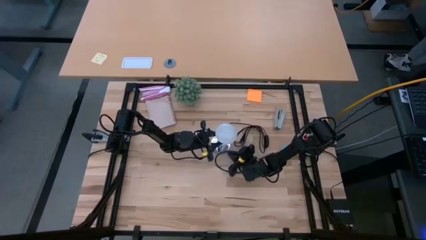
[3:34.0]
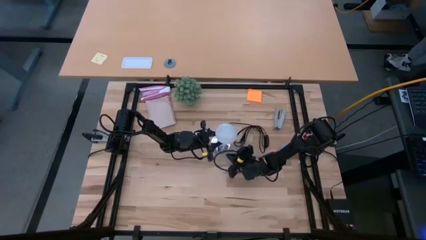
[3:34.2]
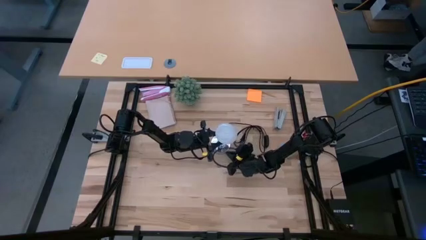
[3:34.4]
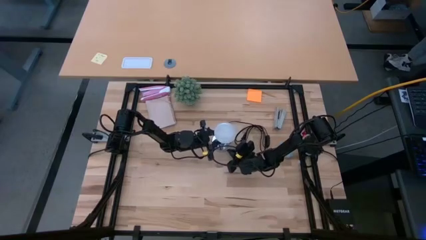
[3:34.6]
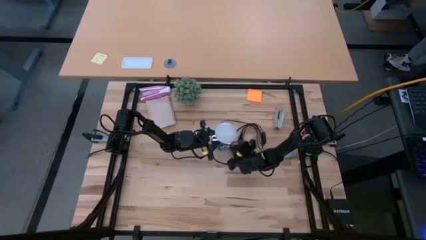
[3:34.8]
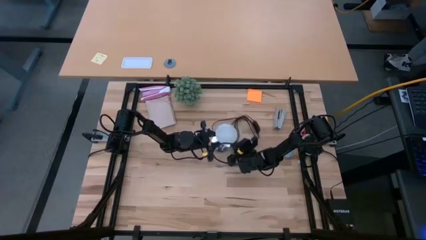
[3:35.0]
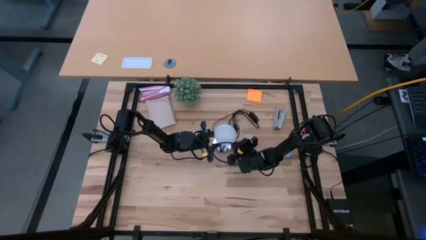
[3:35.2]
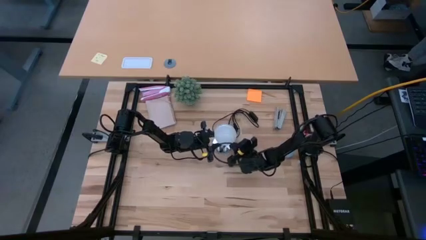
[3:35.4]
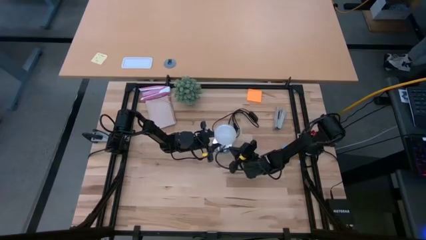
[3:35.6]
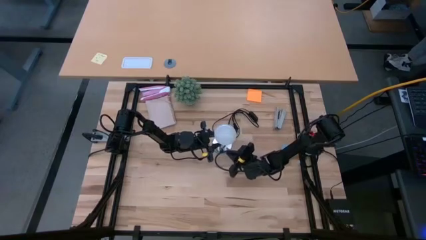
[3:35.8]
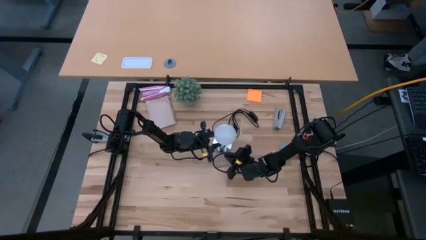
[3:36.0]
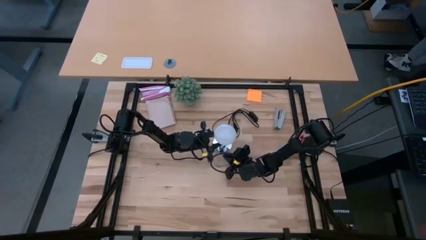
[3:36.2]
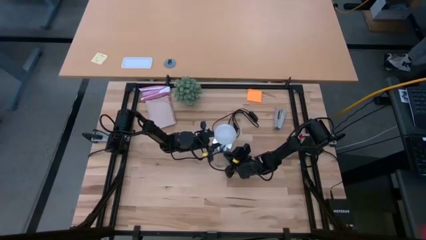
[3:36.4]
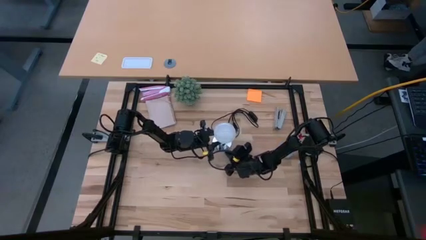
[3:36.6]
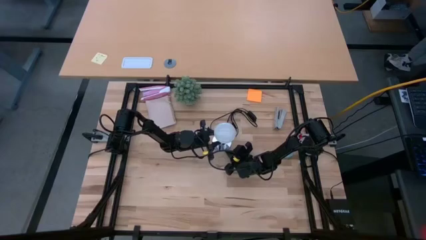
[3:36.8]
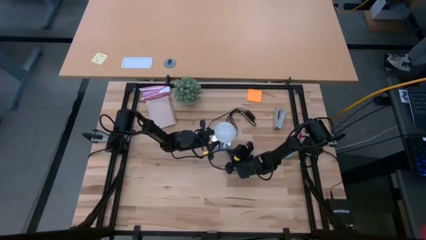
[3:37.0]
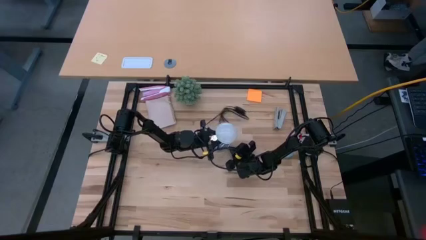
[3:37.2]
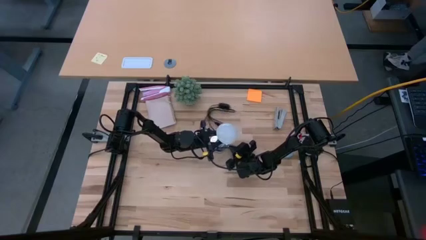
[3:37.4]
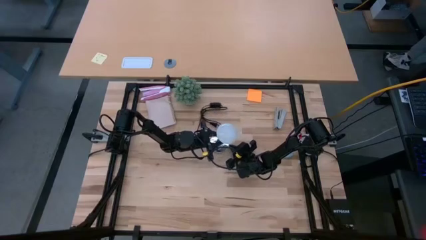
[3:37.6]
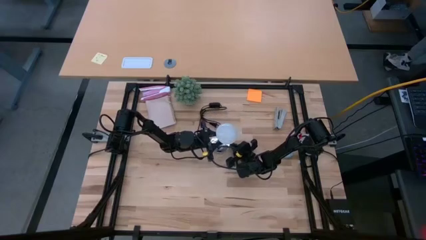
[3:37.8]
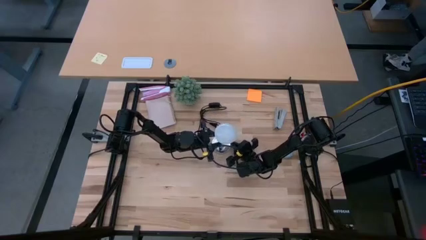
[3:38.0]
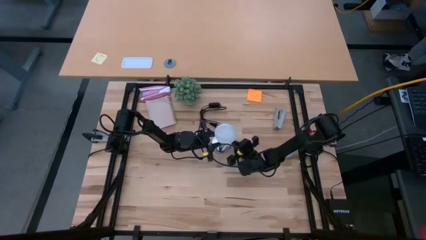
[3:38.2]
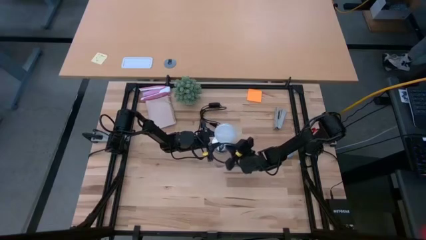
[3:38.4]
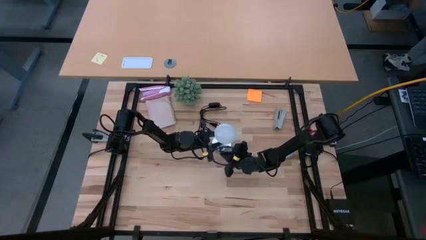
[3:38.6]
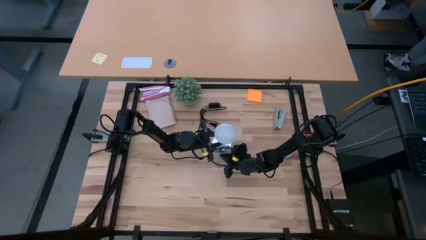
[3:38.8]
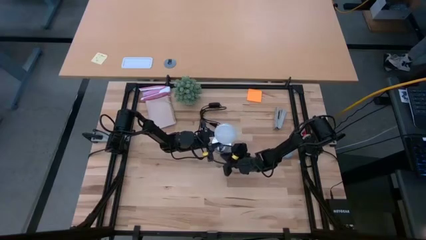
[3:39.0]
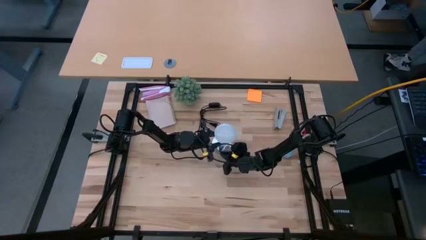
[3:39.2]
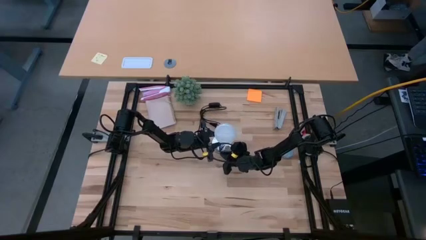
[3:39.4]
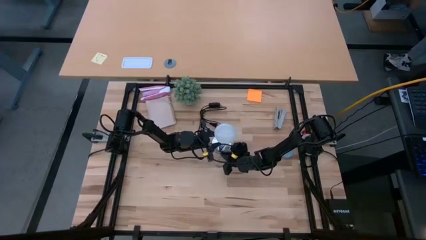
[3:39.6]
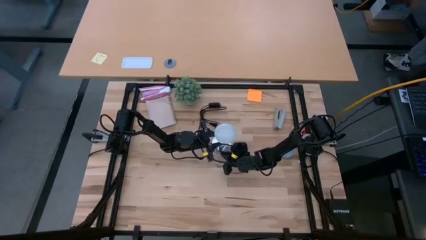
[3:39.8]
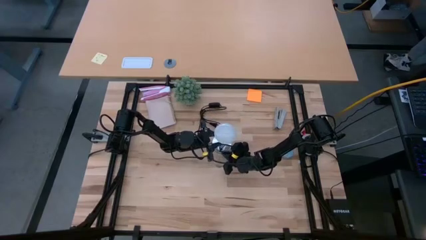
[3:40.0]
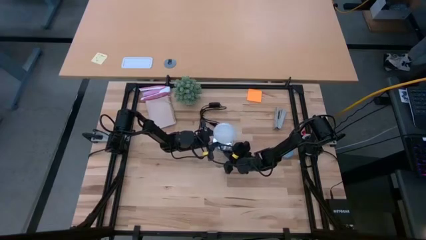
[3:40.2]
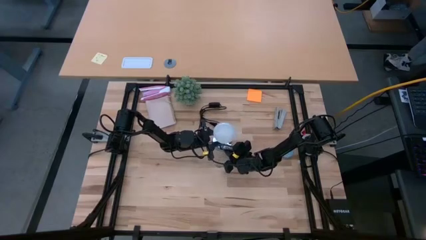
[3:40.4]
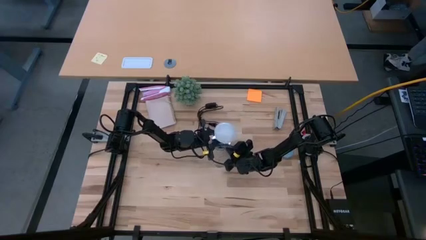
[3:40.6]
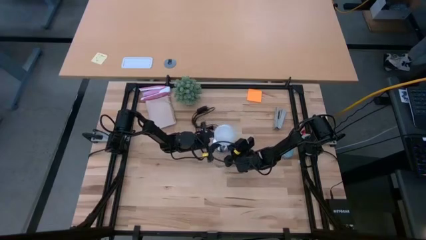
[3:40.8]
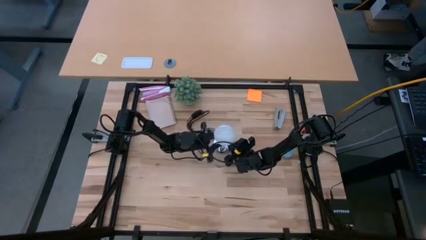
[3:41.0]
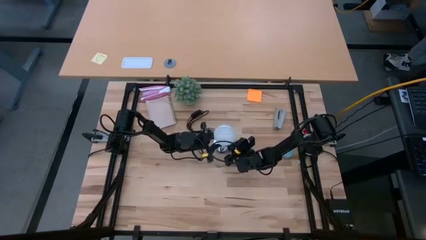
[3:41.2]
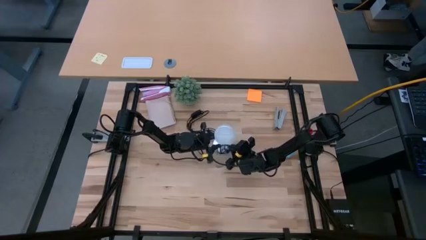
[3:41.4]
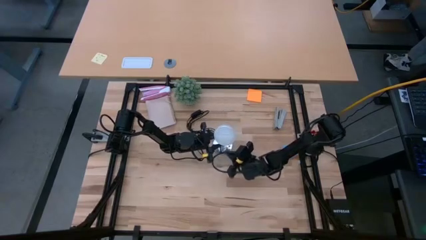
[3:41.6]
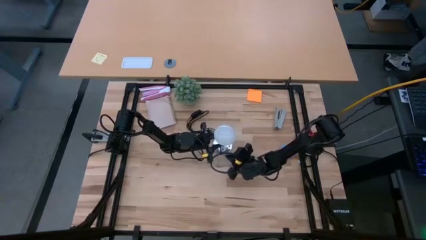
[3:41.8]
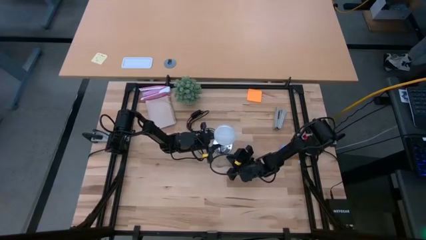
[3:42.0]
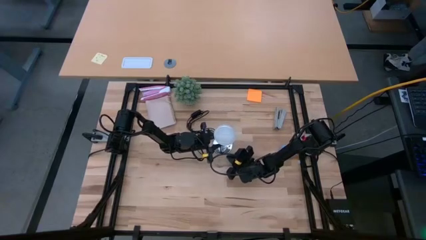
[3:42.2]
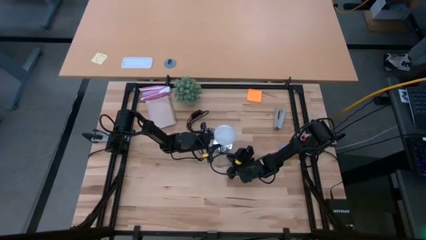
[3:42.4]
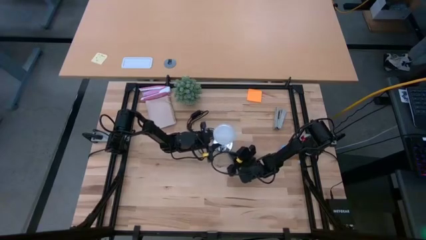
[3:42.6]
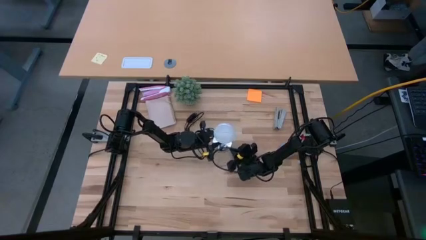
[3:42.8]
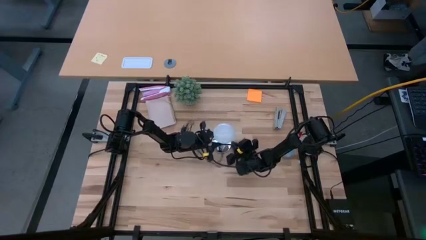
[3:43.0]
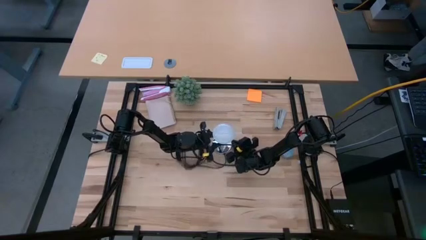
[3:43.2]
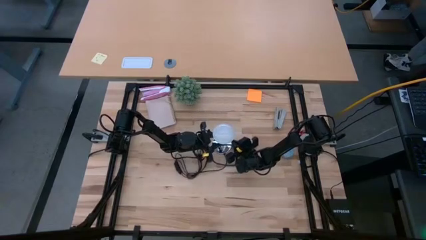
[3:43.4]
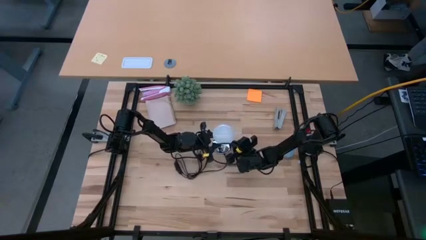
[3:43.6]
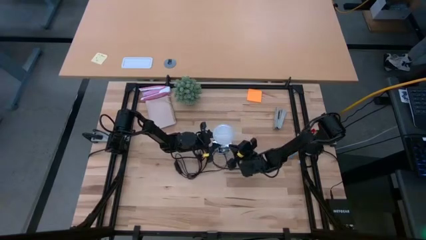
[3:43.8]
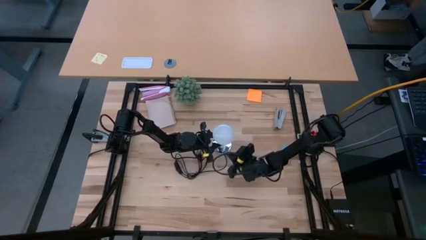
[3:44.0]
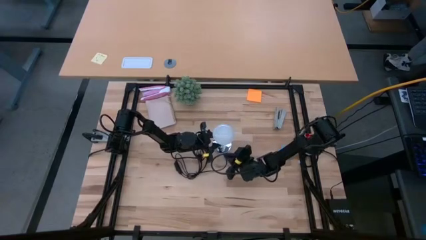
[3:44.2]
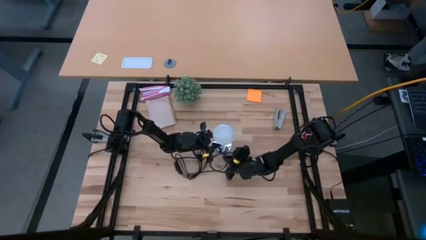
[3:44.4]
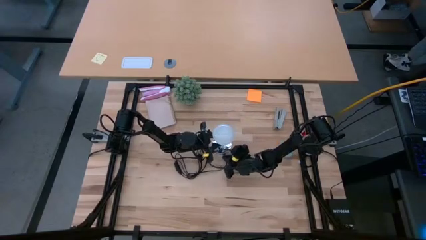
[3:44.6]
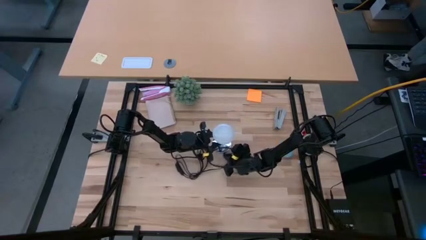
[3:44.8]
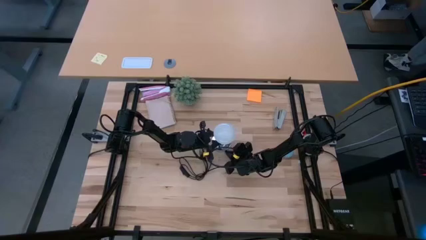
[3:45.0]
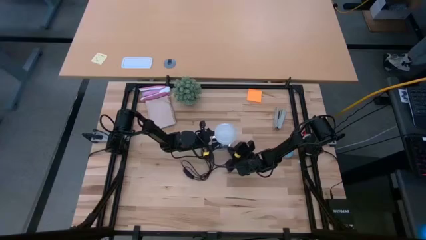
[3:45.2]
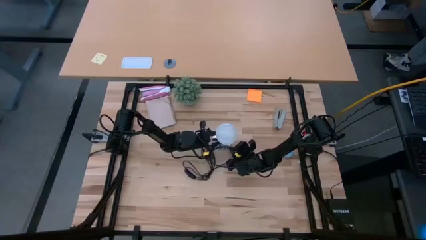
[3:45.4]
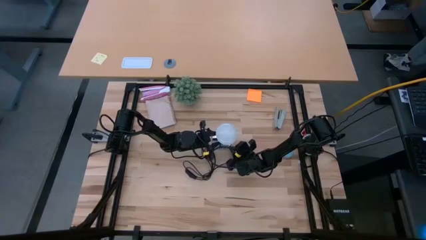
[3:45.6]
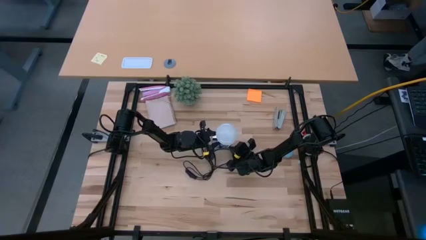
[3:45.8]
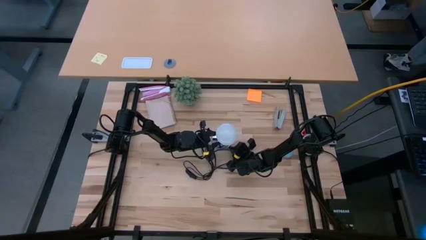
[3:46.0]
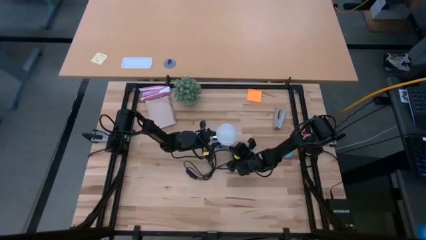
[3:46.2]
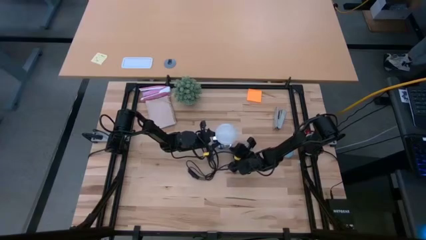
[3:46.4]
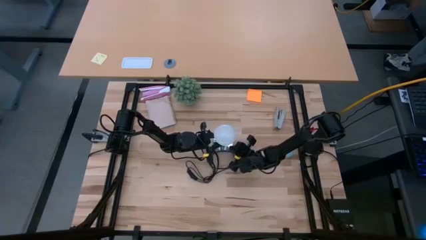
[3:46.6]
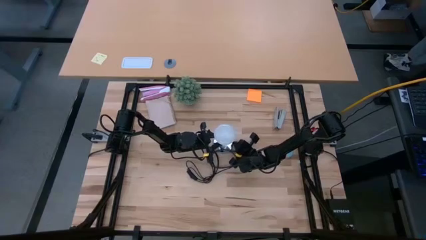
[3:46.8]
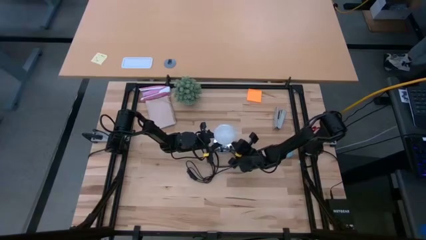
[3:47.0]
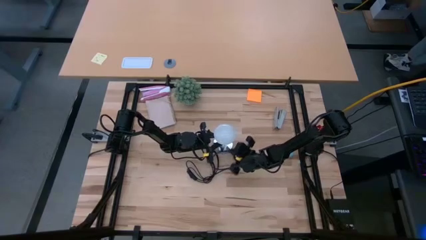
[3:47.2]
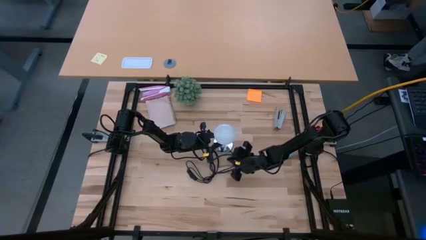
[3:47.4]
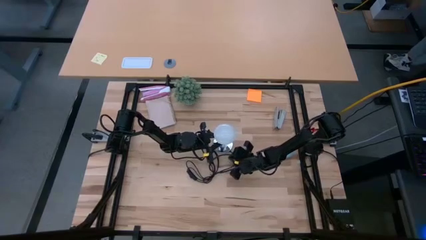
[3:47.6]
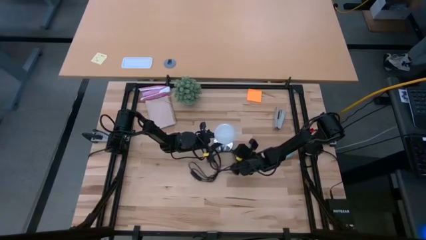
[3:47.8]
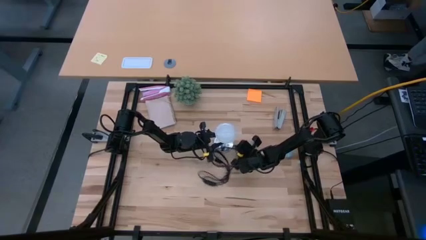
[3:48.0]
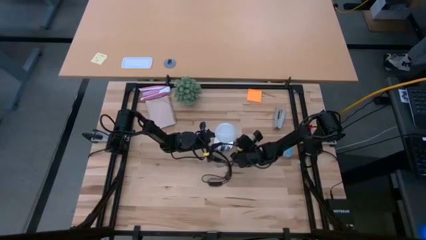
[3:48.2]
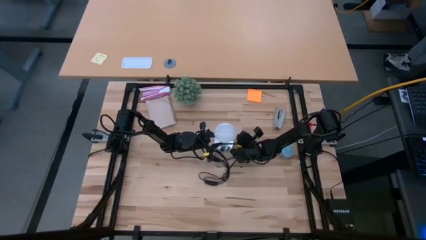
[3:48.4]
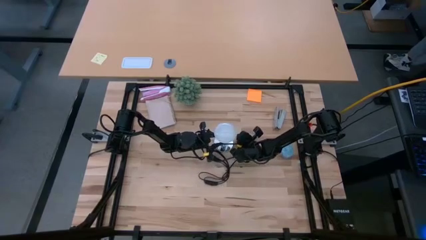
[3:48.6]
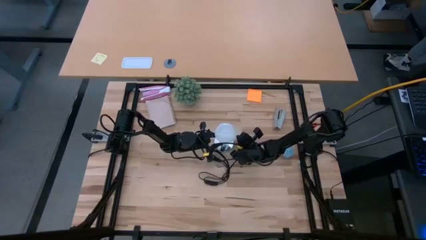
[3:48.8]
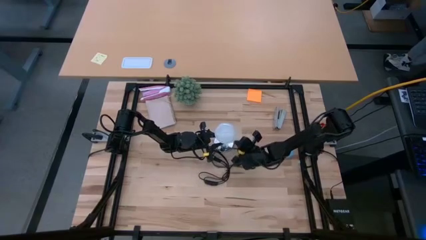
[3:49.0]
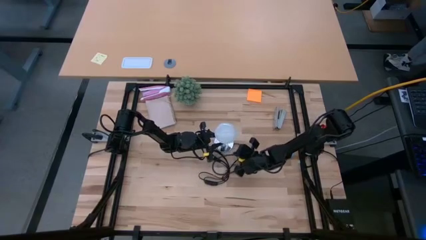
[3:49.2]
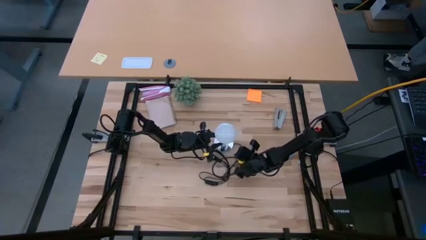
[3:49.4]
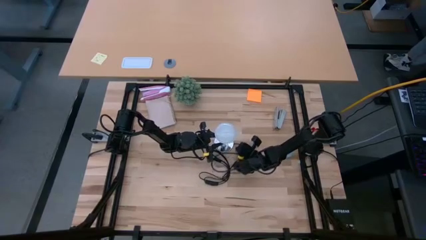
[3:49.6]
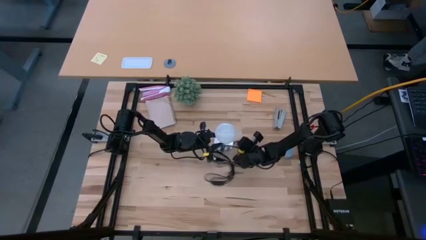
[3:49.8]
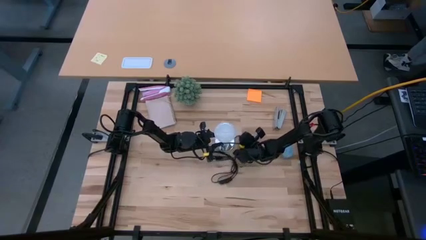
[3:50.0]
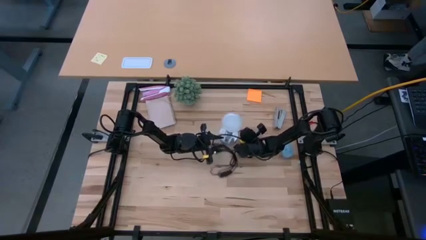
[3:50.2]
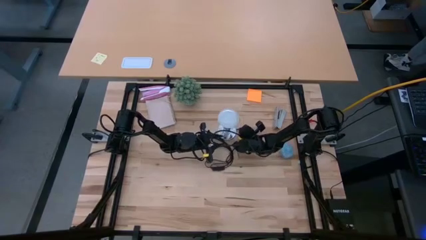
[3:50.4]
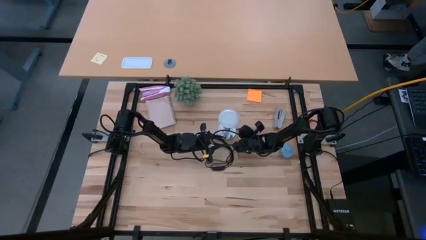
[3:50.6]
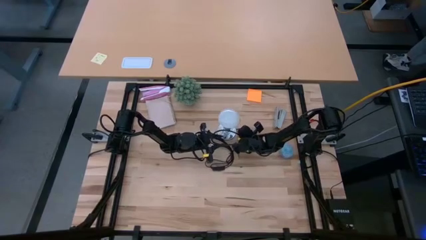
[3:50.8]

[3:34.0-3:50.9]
Task: Screw lightbulb
Insert the lightbulb into the lamp
